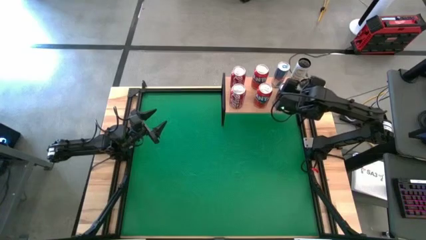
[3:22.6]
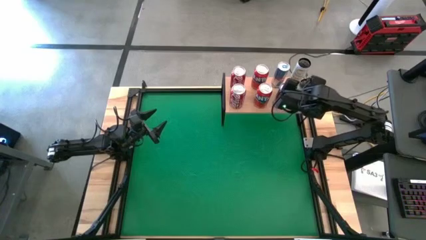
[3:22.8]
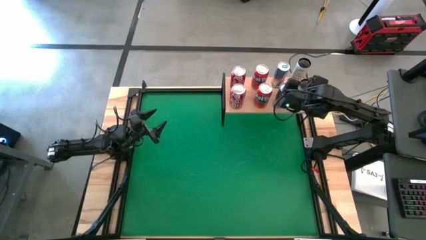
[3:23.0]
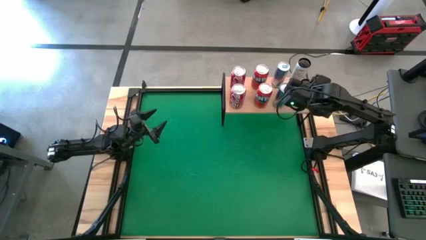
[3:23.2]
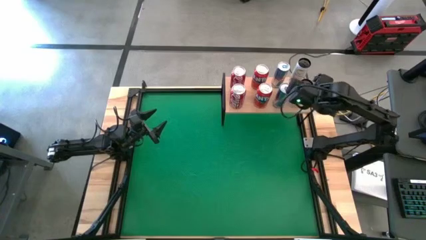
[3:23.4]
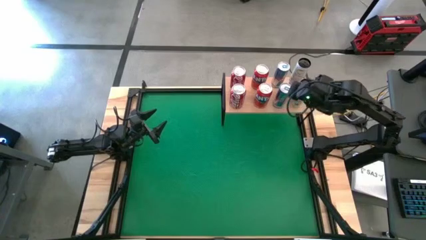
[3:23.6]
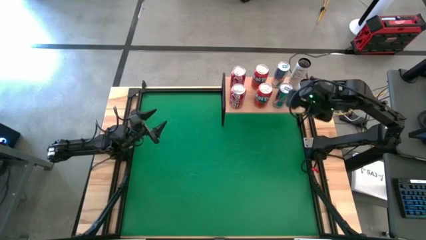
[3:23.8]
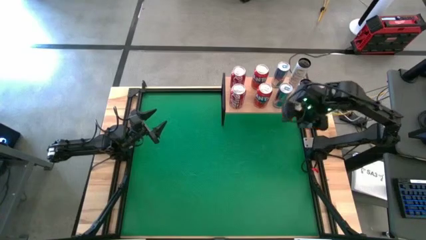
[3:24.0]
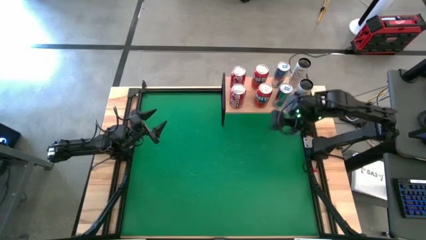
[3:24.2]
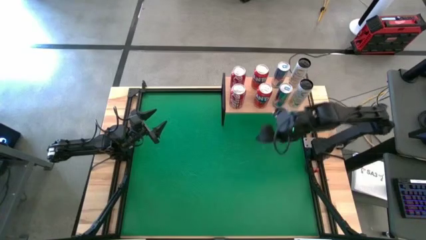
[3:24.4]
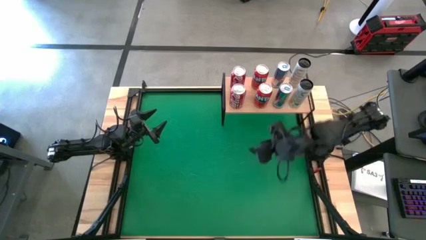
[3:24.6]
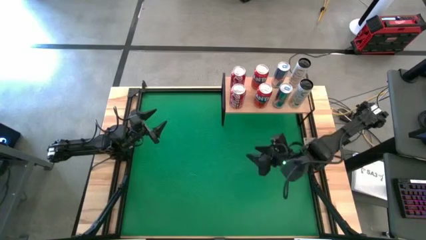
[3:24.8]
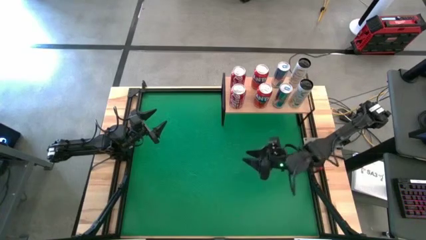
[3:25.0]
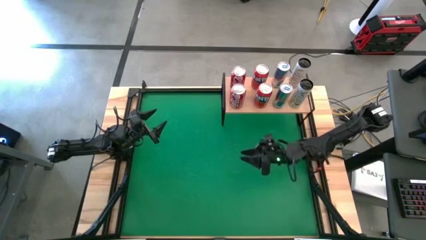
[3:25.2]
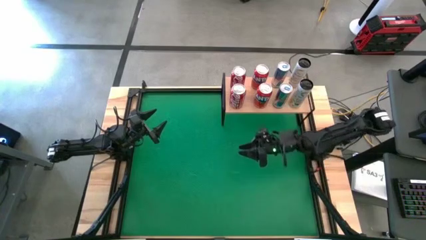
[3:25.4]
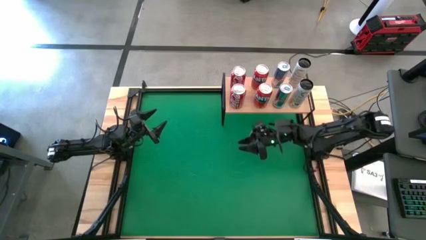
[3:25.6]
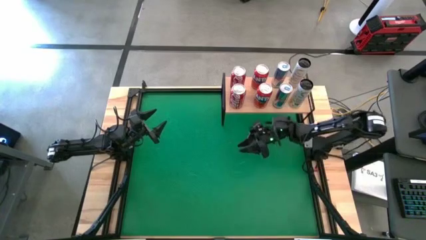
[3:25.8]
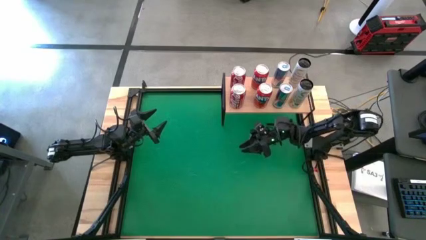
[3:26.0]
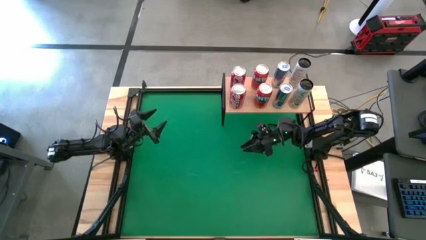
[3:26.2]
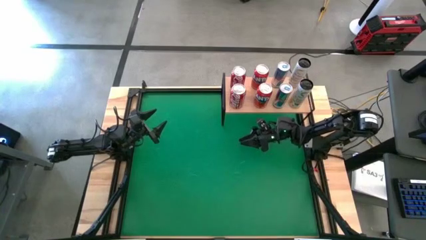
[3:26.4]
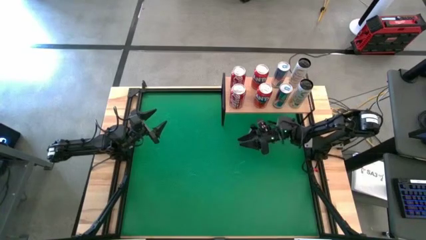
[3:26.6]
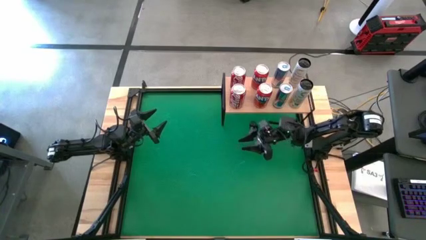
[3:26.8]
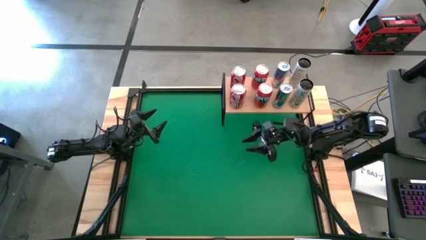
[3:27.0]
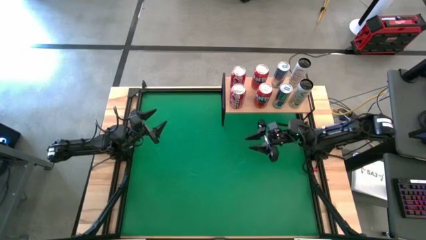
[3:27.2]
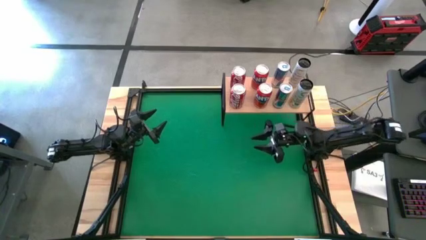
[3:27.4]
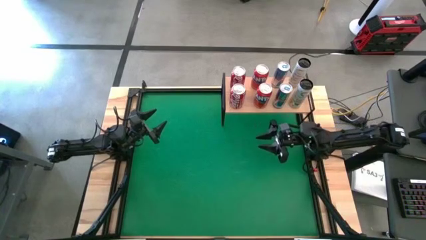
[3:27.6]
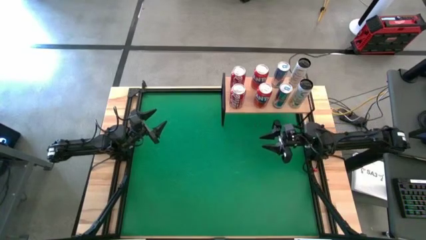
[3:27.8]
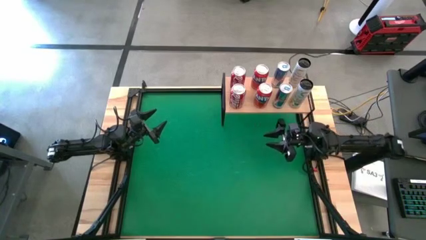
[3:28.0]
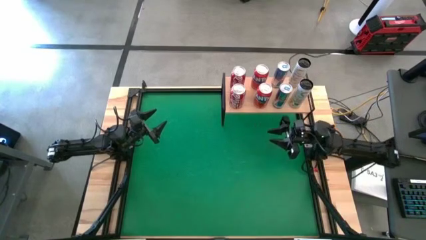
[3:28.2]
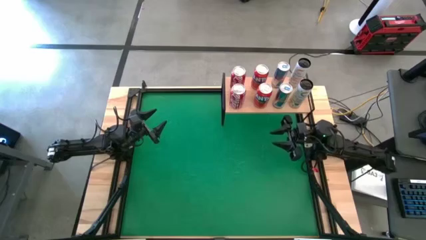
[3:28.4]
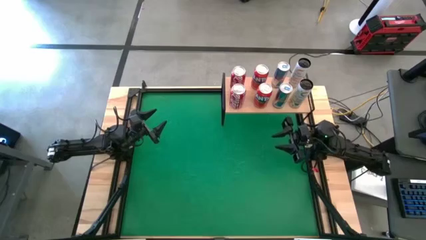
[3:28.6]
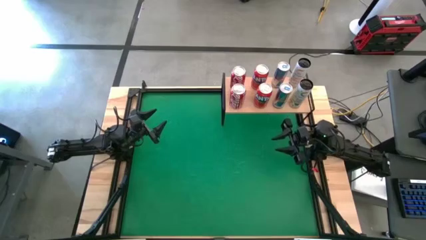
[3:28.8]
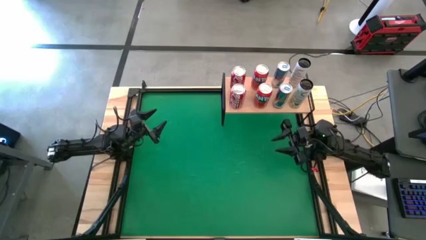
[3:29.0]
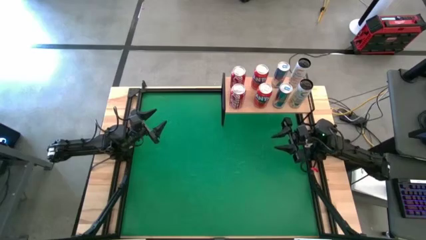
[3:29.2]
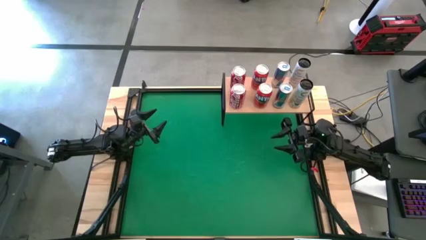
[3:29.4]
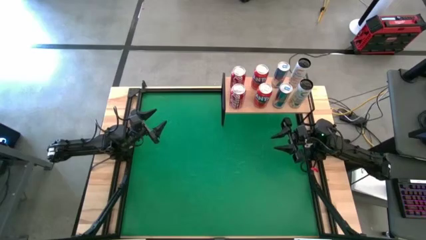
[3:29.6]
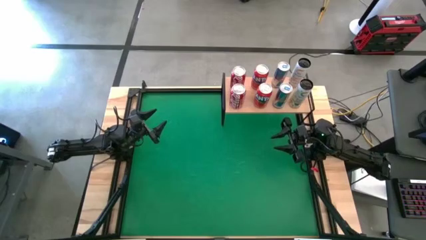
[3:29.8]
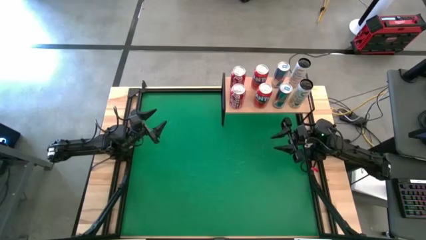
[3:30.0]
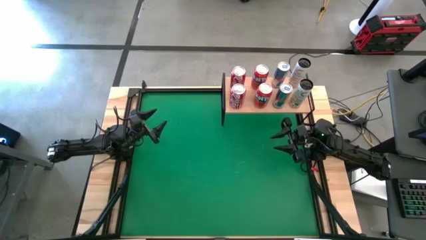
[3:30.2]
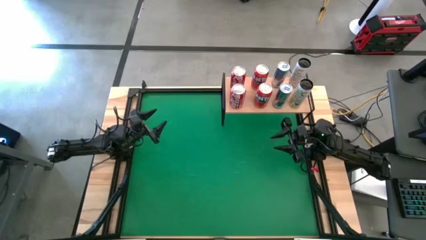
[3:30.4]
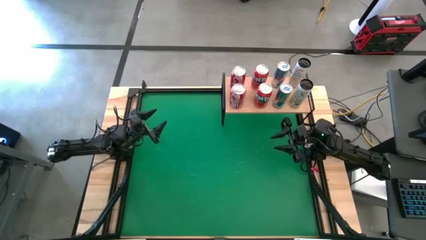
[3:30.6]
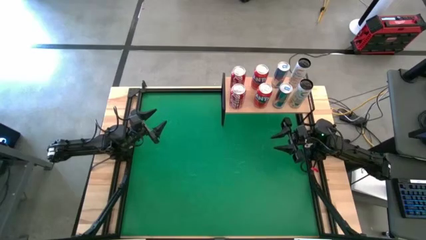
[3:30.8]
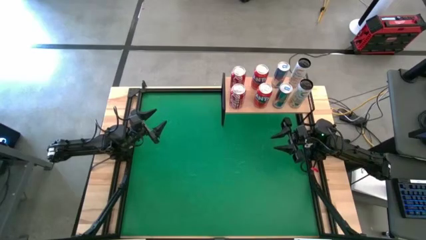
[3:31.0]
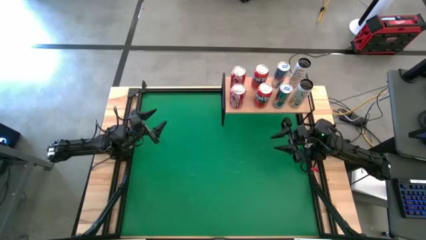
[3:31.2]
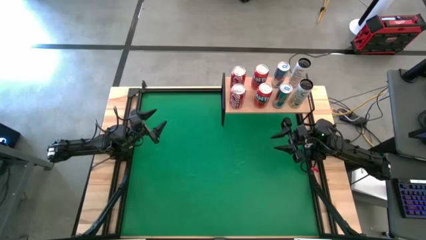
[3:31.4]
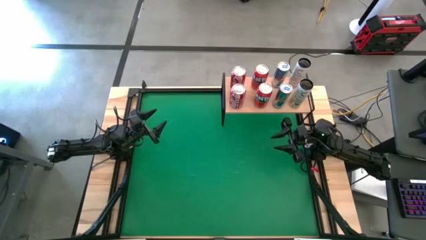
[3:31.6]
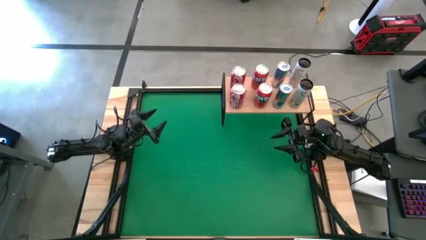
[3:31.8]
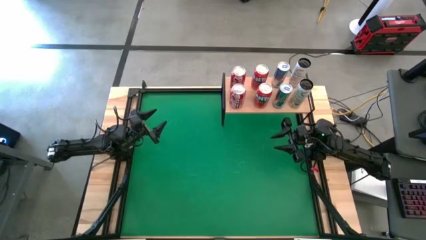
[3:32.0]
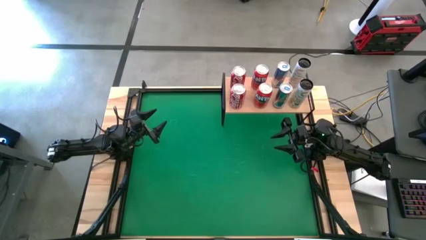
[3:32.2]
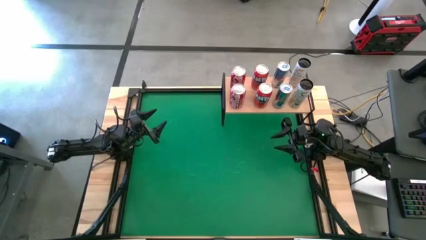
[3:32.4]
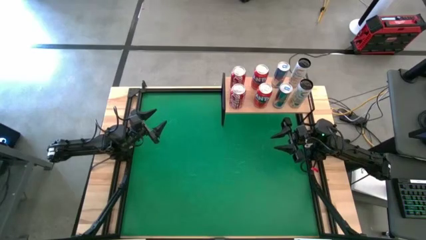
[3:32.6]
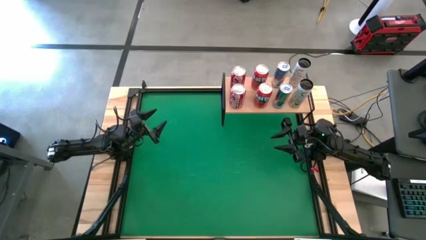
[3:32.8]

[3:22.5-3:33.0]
Task: Place canned beverage on shelf
Return to Home Position

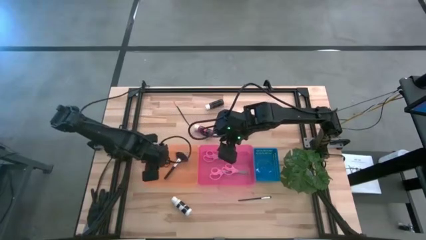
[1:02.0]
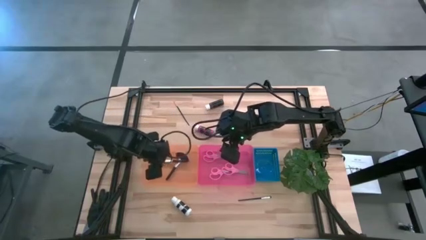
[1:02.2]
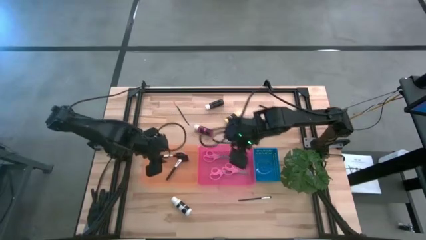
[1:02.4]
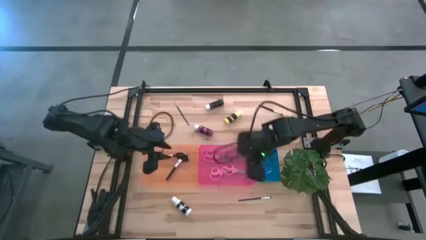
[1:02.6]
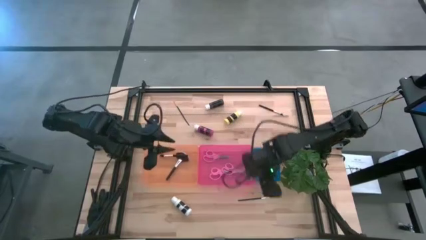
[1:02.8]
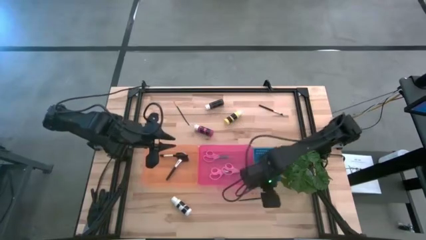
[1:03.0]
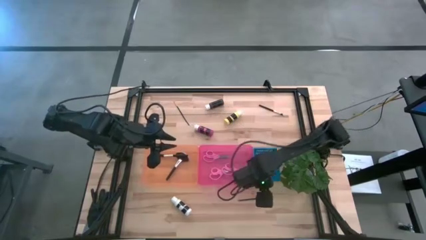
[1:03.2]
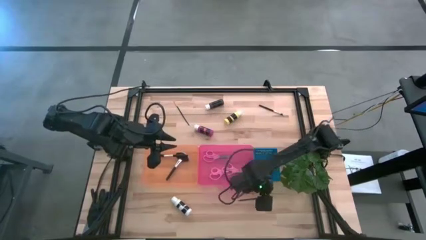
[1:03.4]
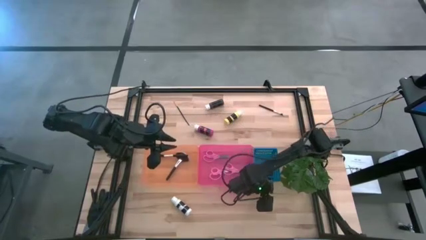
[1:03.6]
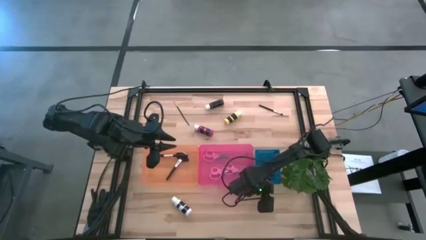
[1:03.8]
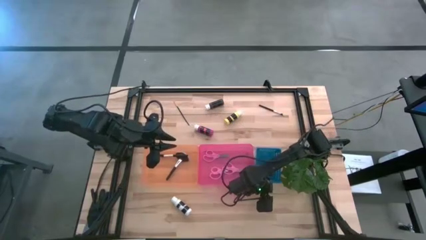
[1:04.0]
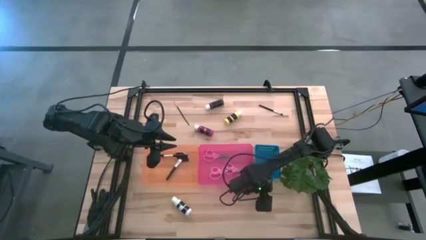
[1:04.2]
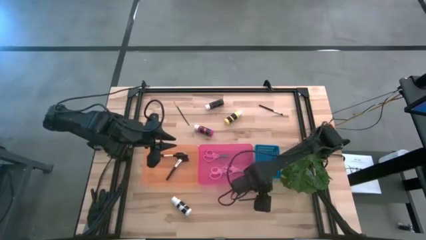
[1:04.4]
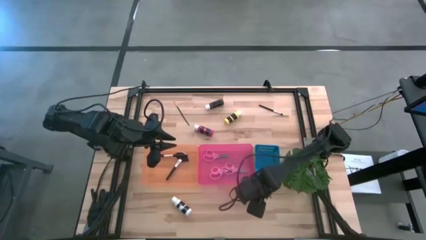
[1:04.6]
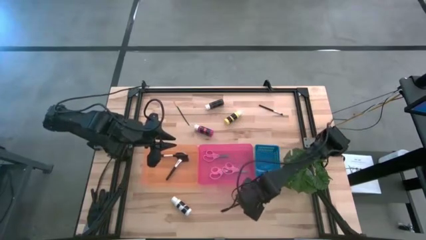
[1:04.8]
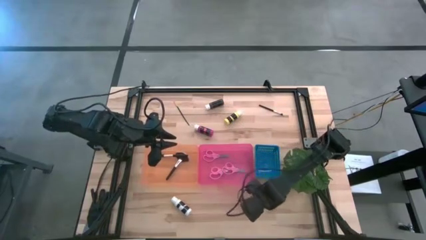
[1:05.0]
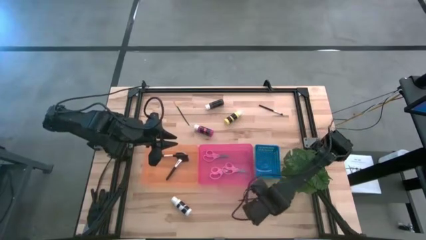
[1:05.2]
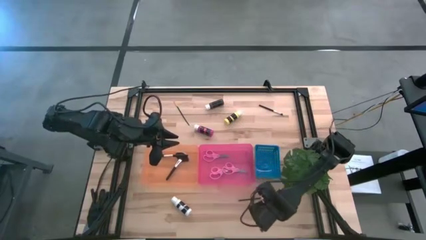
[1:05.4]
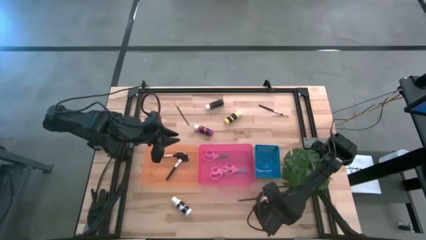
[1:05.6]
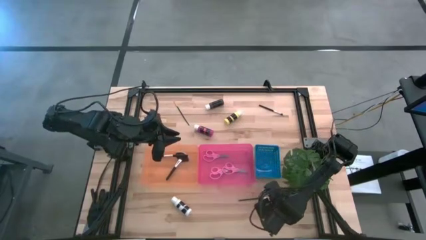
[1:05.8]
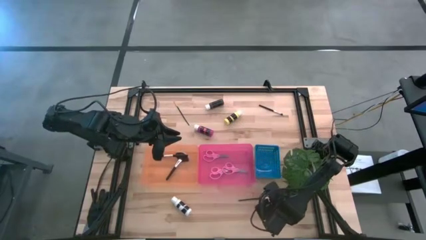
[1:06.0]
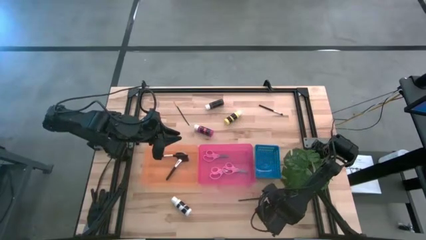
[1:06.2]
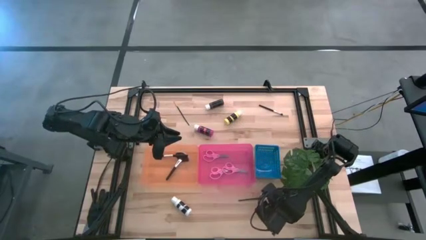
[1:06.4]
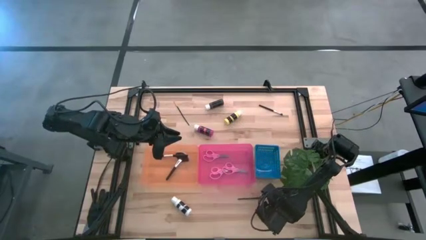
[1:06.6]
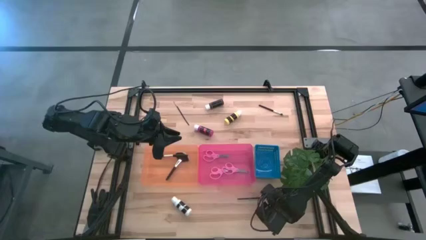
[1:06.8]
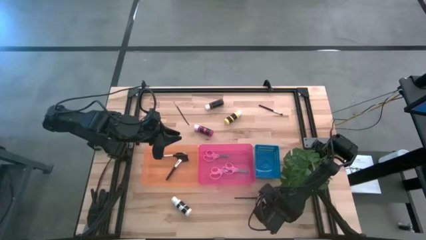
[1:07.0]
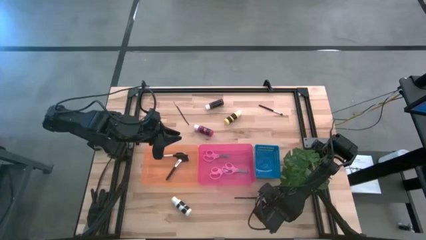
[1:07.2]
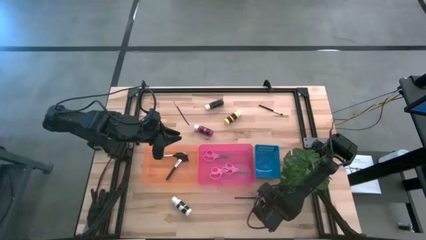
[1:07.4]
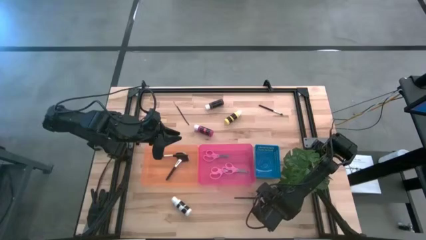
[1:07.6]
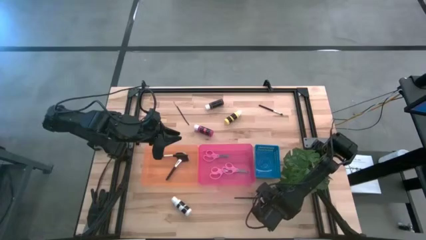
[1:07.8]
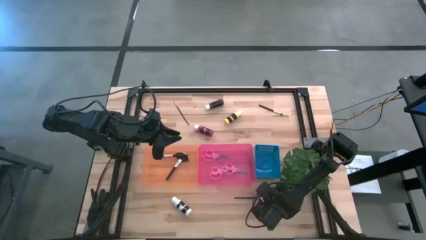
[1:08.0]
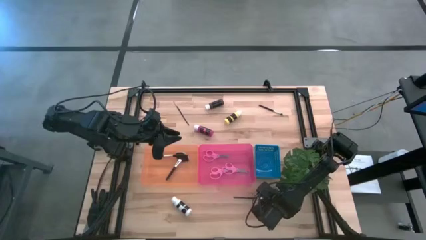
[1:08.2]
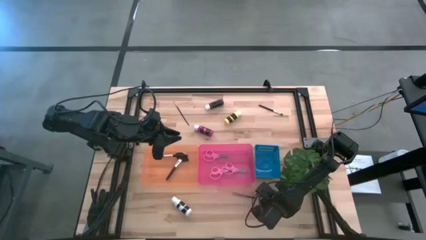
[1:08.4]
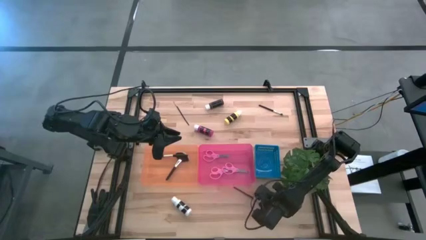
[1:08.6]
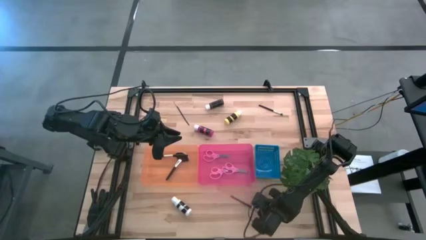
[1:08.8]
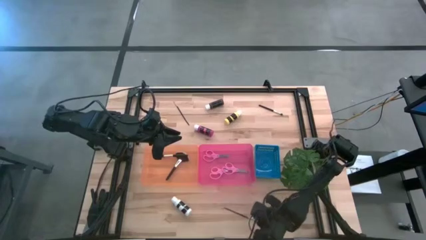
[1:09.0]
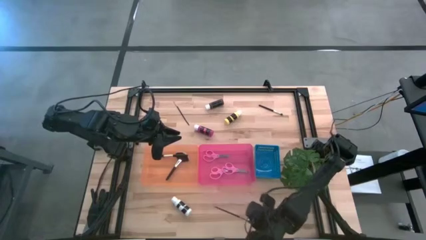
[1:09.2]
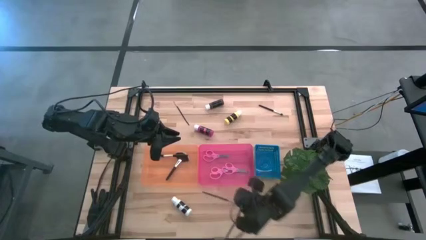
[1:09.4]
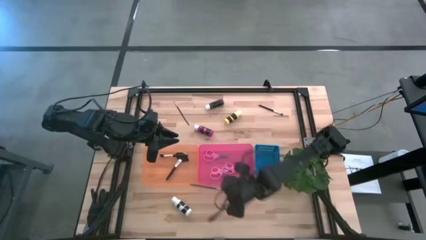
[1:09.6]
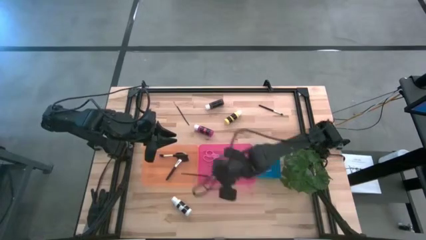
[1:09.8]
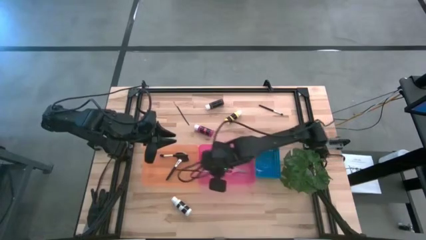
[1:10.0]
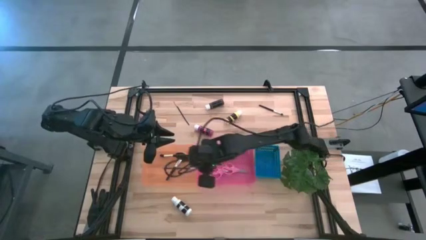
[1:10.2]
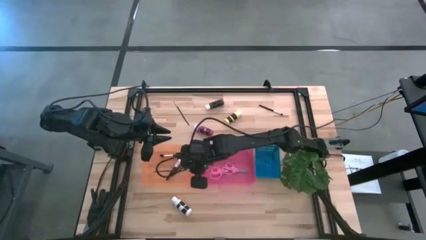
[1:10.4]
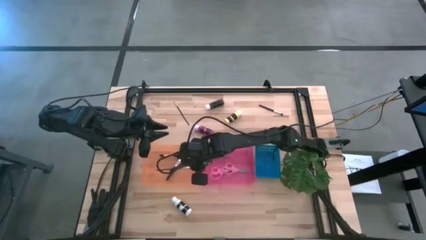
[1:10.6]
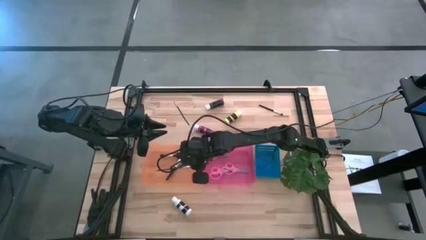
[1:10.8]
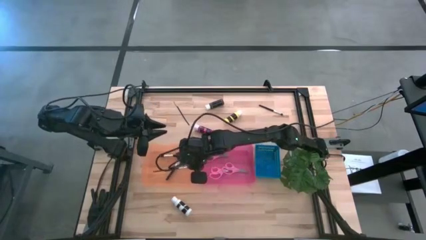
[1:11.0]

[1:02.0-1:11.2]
Task: Pick & Place Paint Supplies
Put the silver eyeshadow brush into the orange bin
